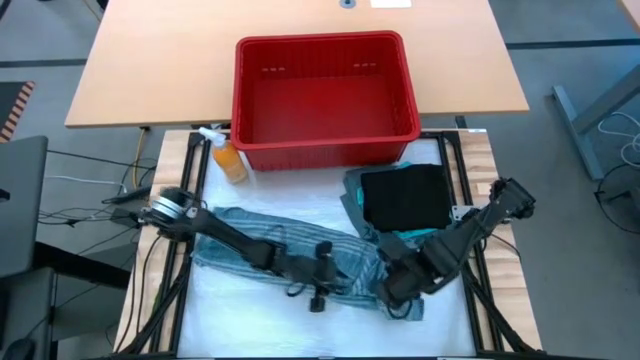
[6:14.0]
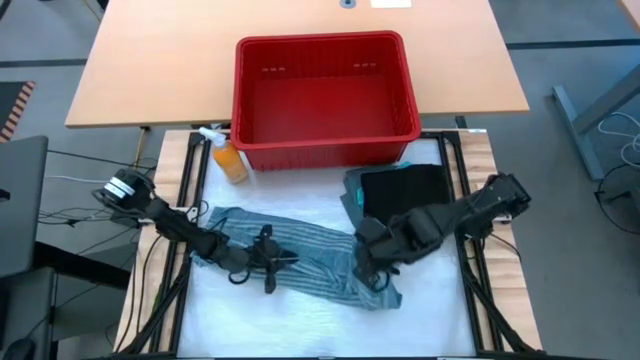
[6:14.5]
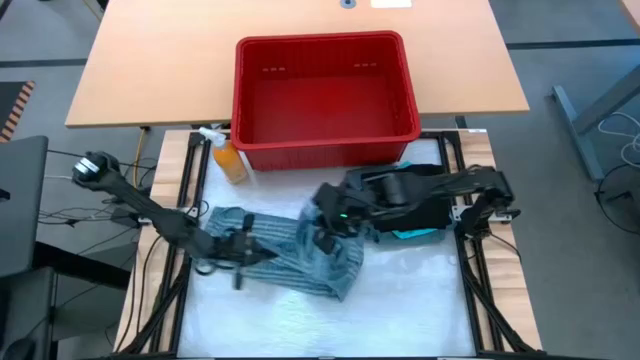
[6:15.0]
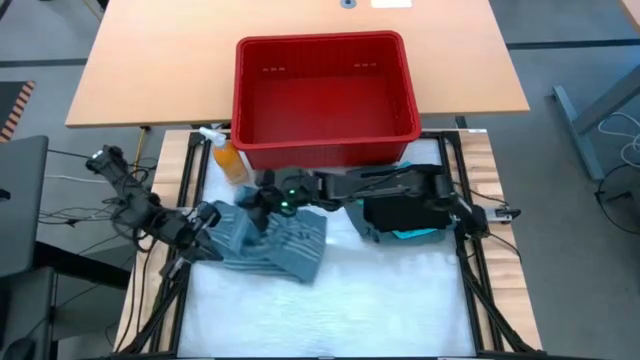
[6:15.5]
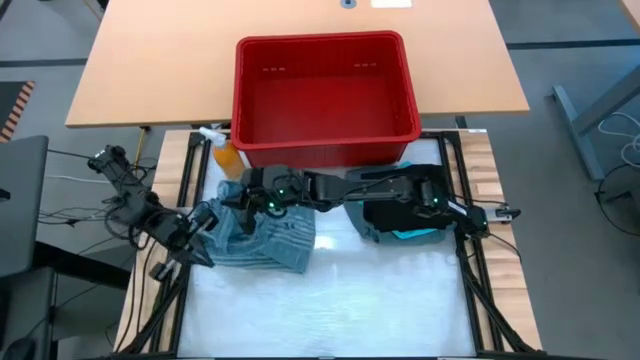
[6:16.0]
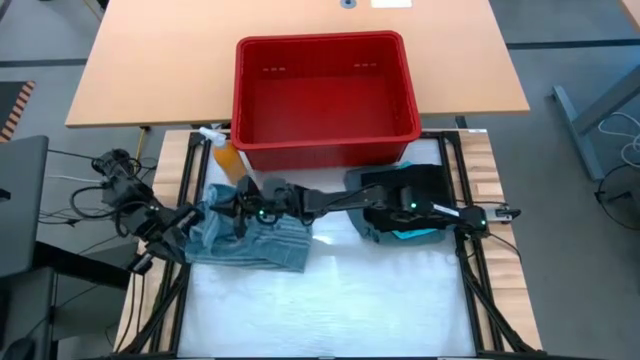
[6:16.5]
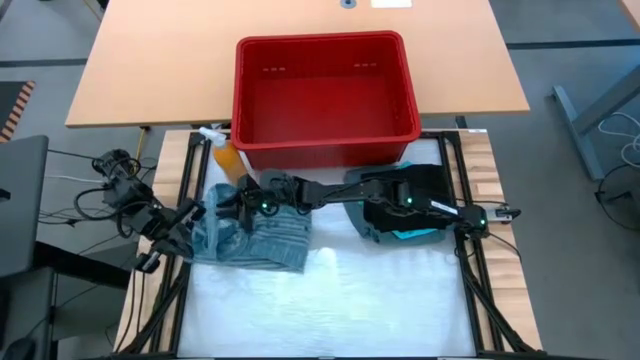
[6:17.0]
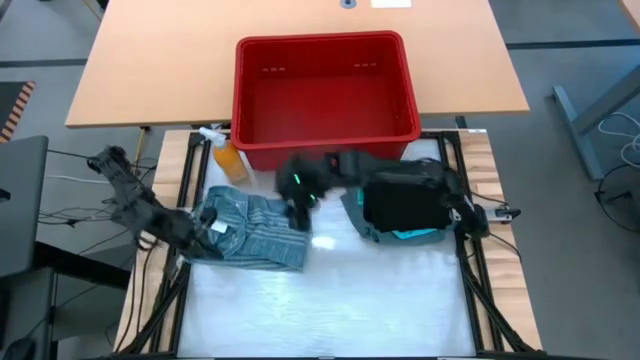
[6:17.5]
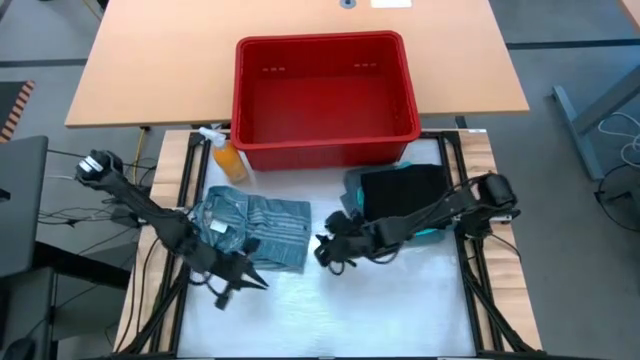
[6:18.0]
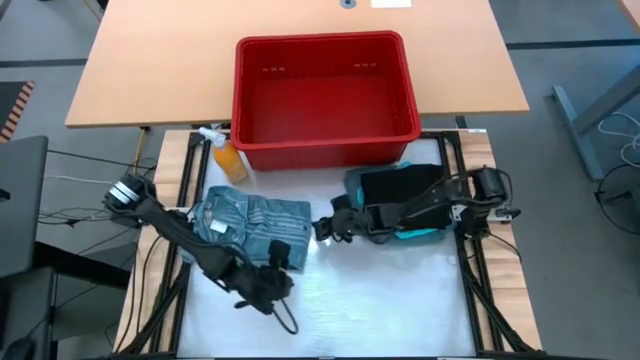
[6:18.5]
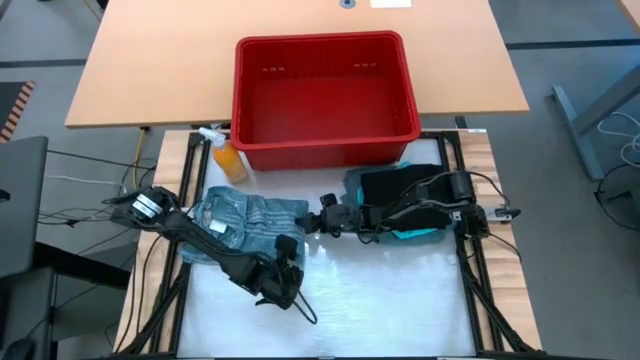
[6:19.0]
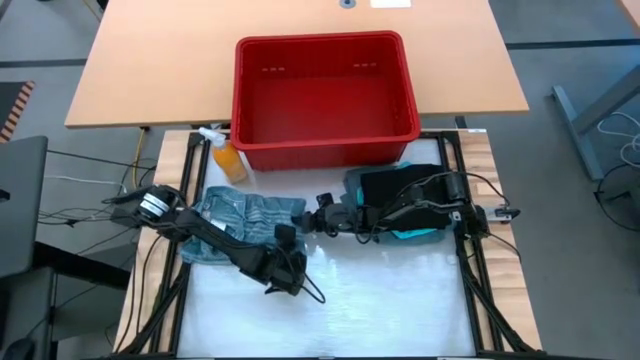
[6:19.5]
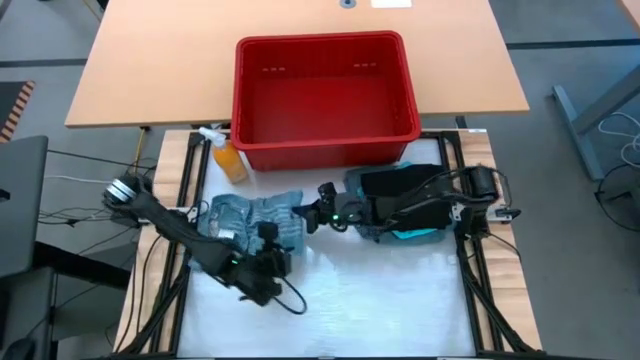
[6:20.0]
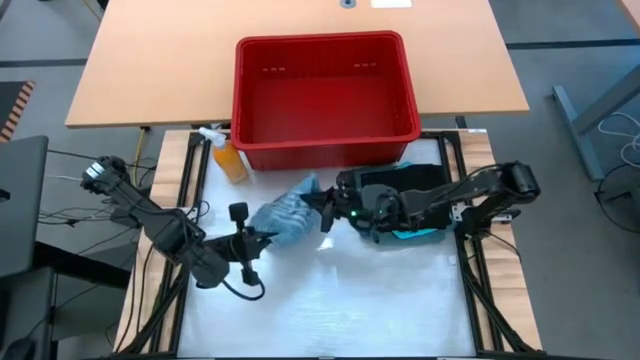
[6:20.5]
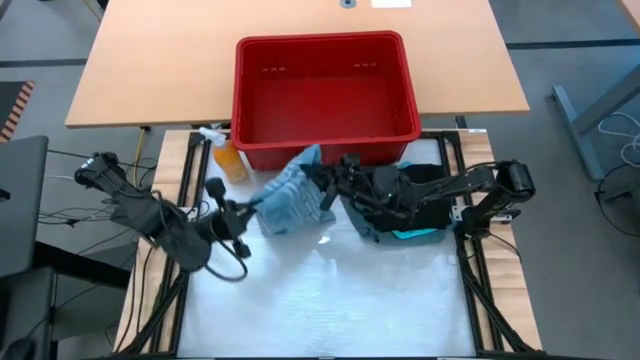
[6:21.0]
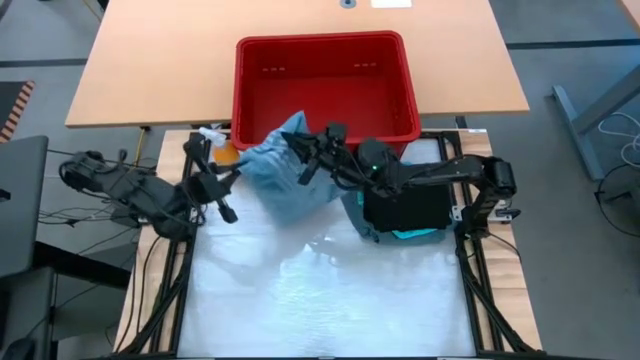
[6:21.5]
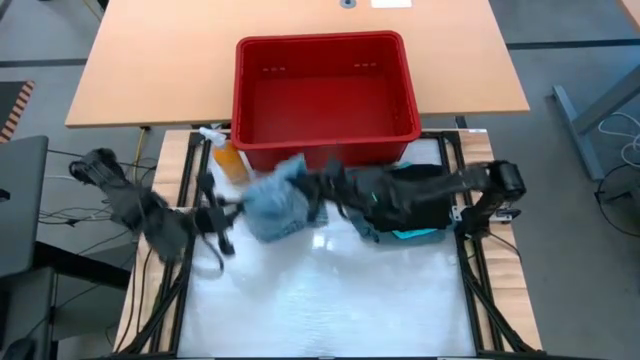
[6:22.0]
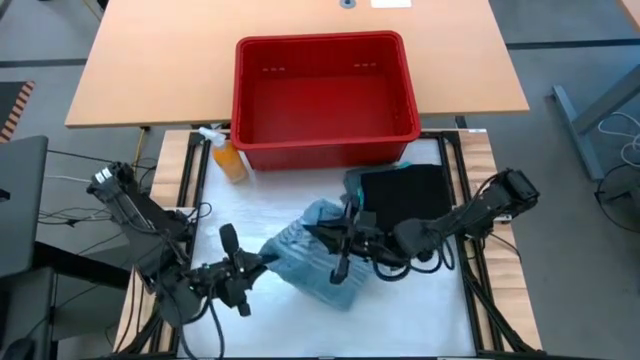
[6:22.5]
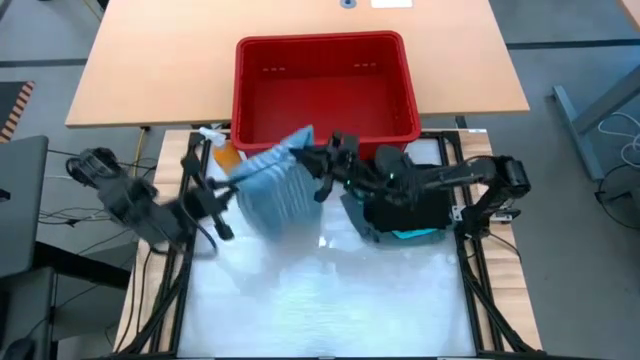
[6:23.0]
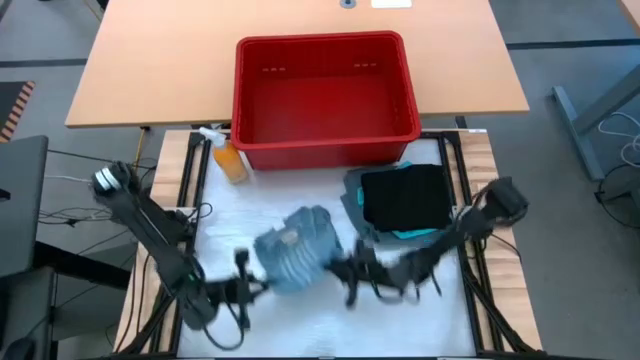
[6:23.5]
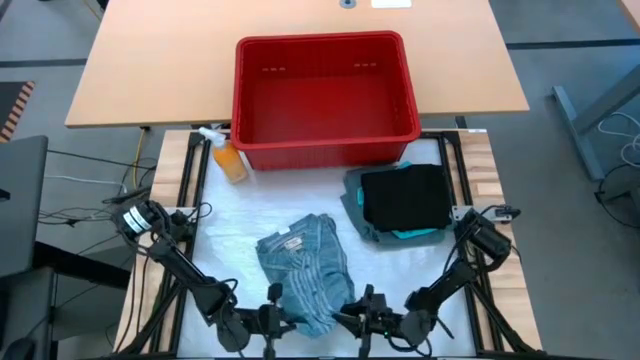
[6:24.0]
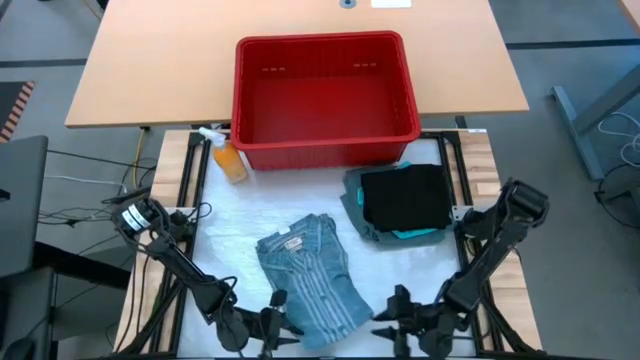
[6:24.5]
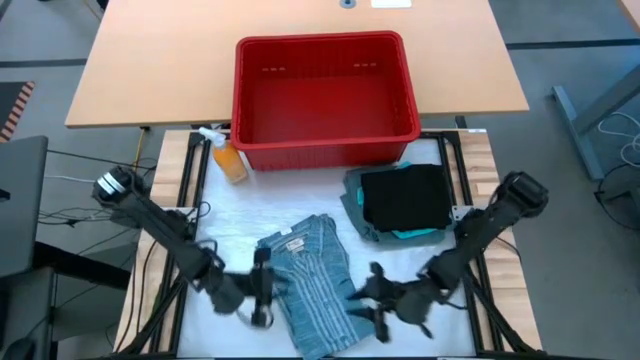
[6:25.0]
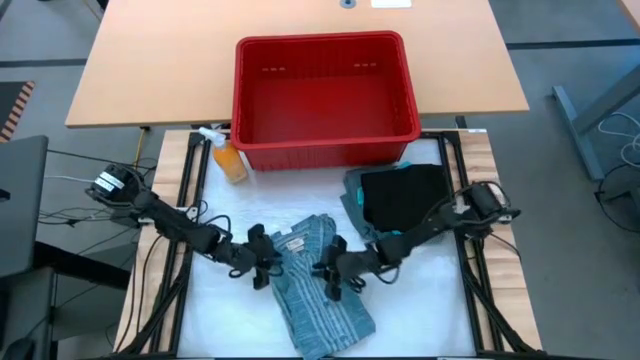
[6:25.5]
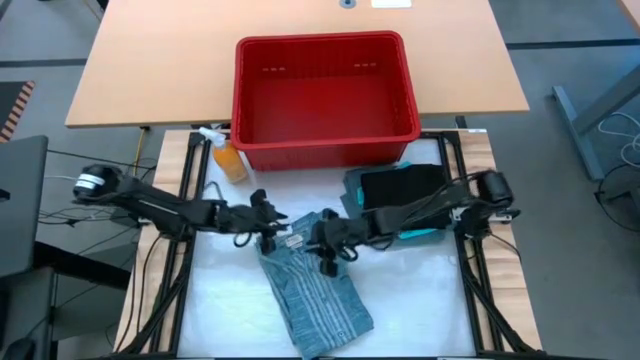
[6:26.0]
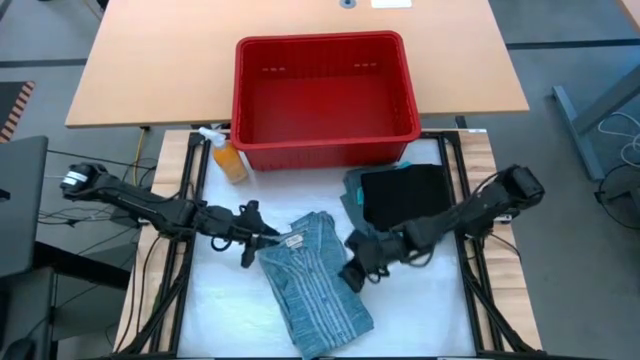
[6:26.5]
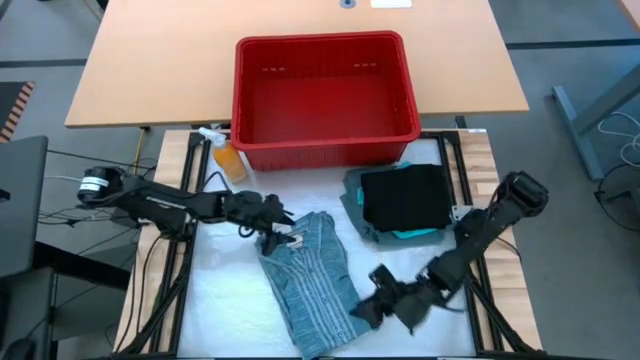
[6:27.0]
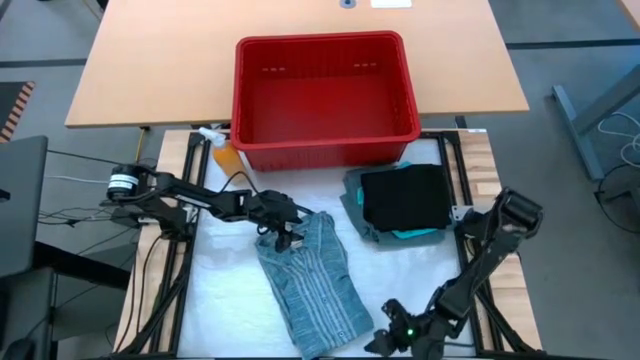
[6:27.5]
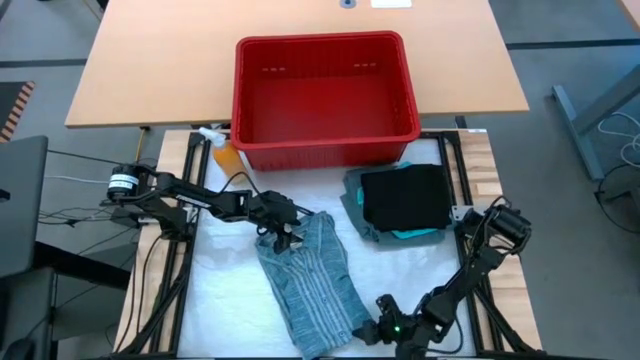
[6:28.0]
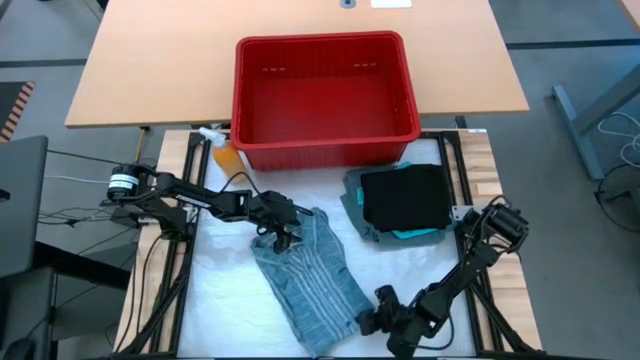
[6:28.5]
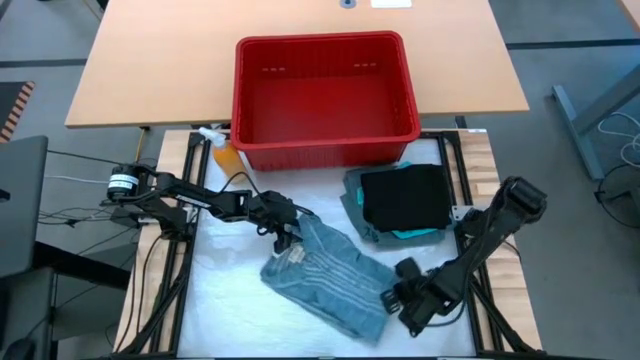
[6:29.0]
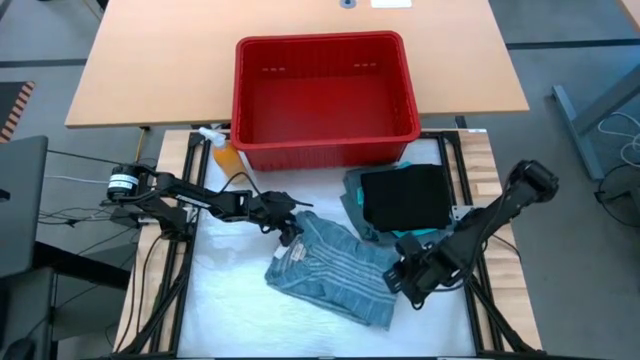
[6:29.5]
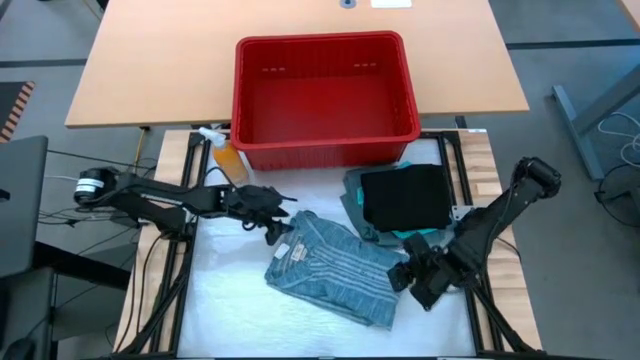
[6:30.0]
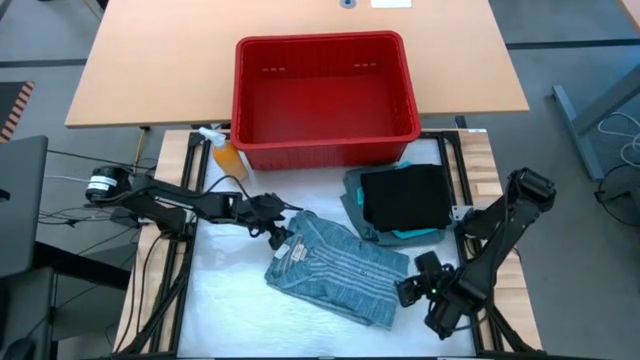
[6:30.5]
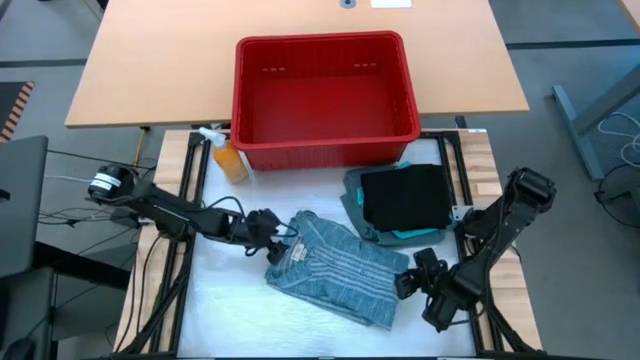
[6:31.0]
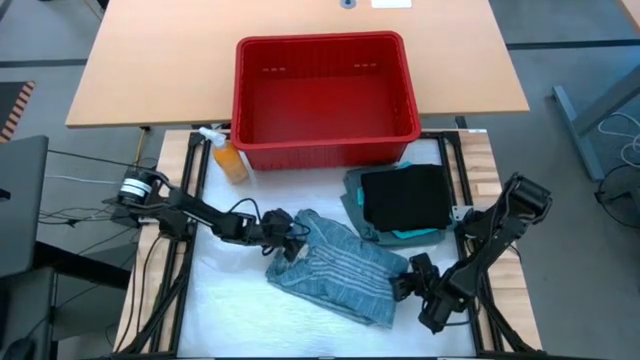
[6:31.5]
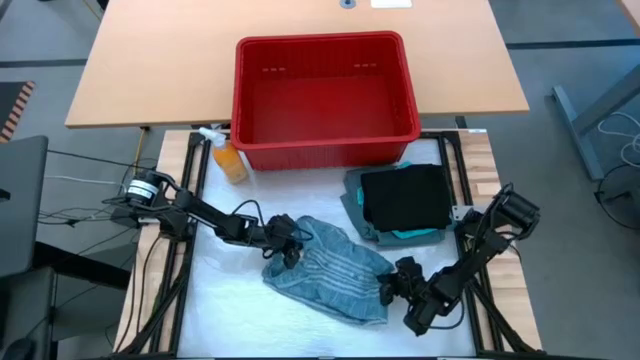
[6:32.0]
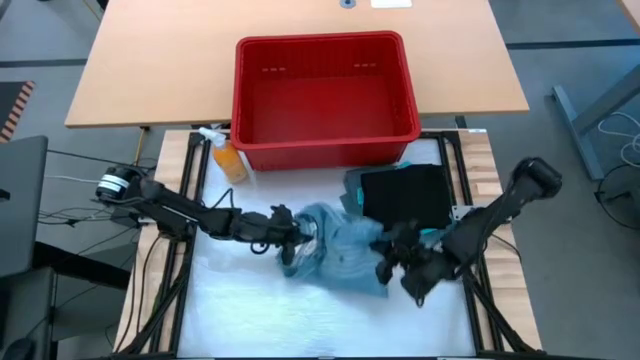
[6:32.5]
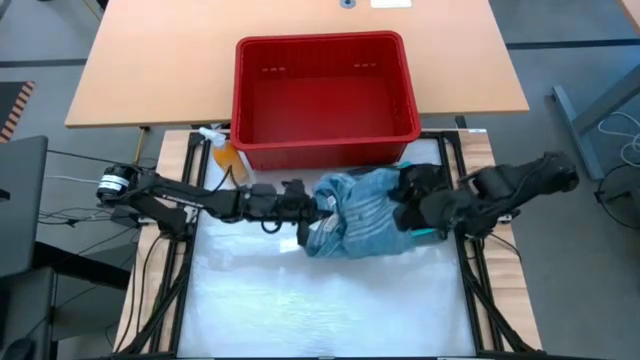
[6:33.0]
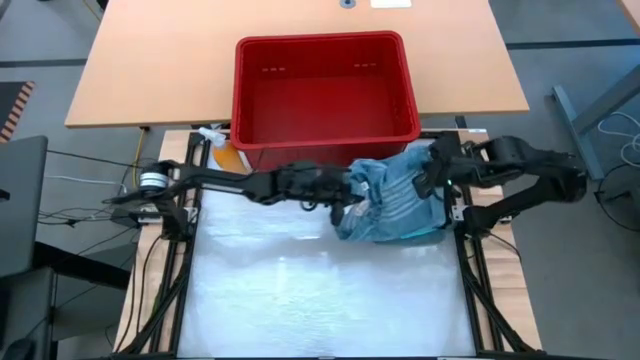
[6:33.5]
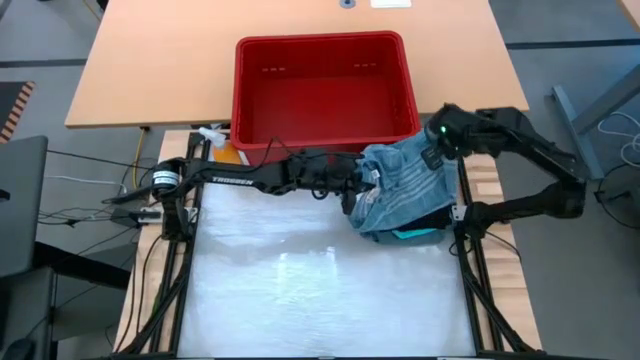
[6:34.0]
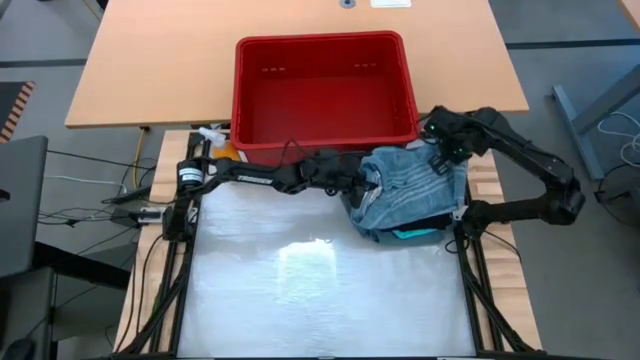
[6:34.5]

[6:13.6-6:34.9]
Task: Fold Laundry from Bin
Fold the blue patterned polo
